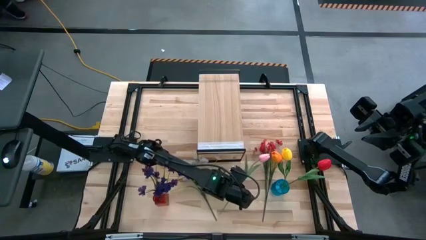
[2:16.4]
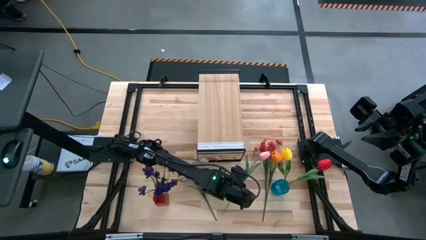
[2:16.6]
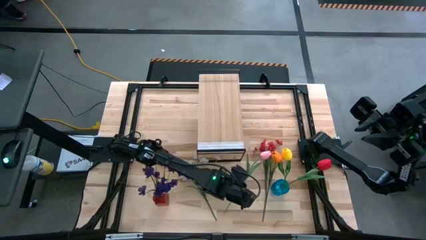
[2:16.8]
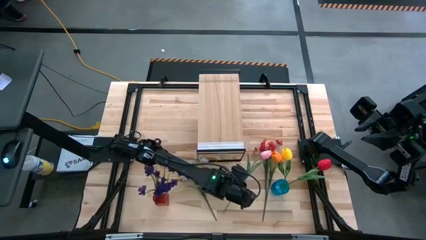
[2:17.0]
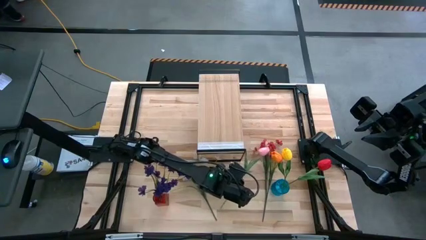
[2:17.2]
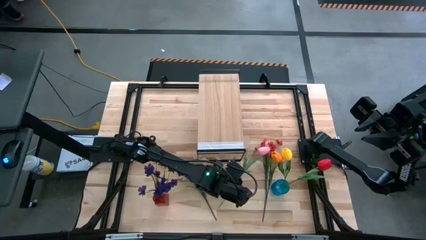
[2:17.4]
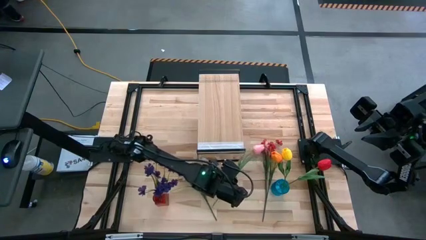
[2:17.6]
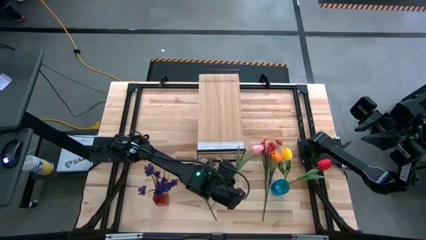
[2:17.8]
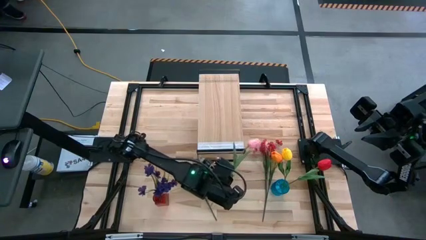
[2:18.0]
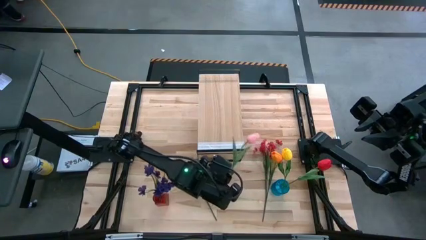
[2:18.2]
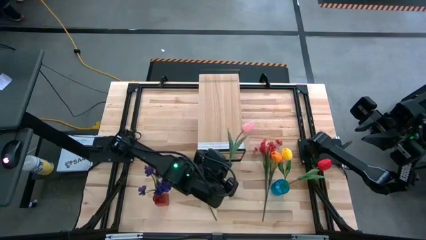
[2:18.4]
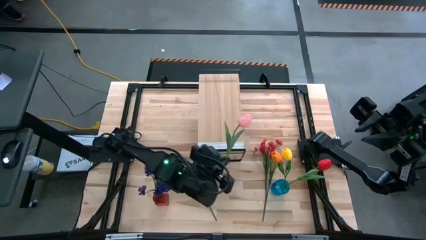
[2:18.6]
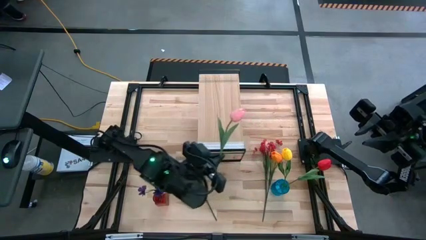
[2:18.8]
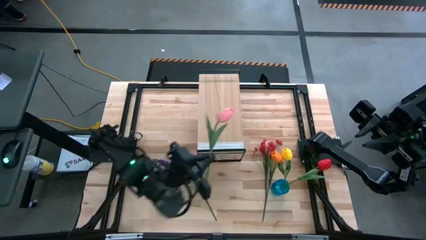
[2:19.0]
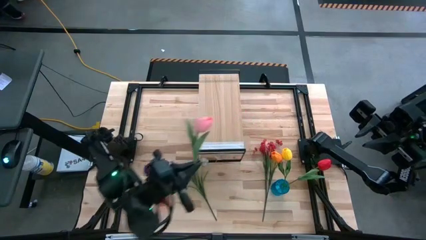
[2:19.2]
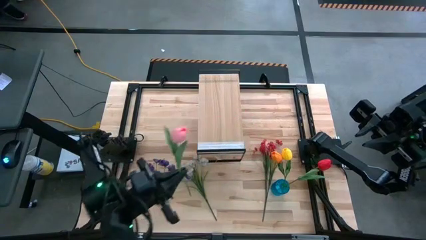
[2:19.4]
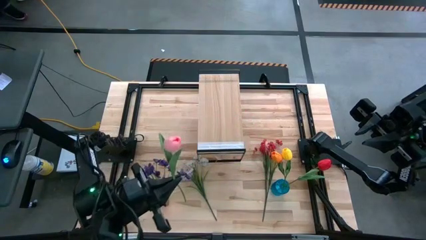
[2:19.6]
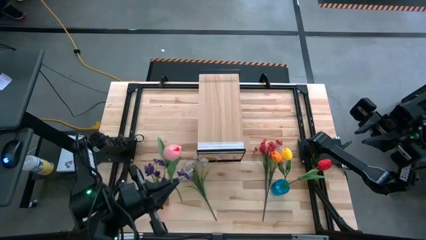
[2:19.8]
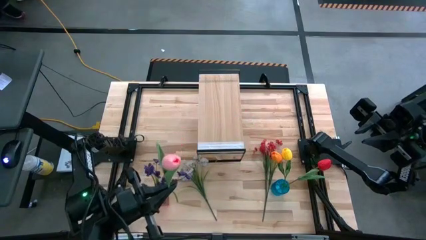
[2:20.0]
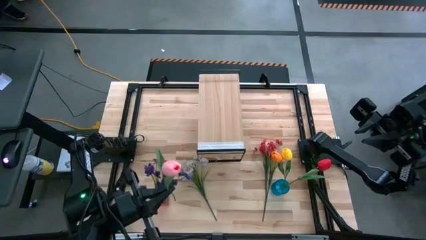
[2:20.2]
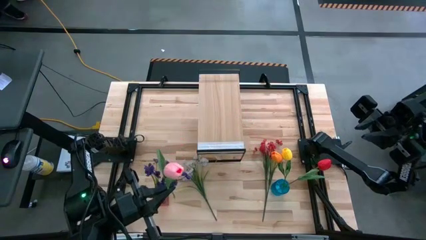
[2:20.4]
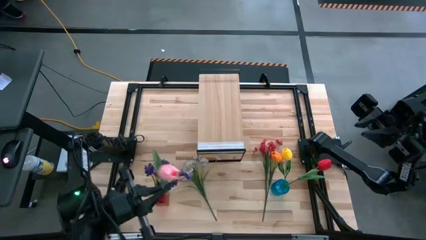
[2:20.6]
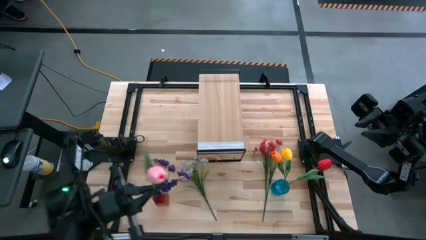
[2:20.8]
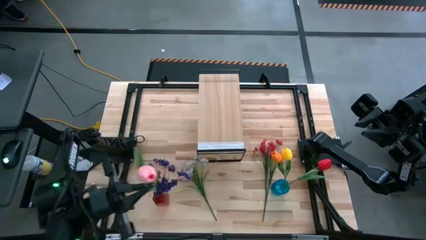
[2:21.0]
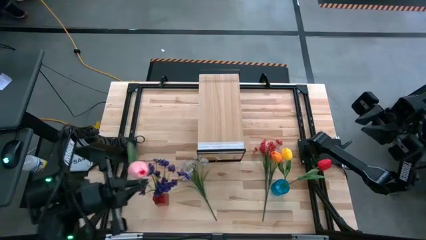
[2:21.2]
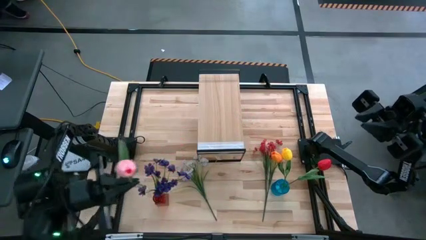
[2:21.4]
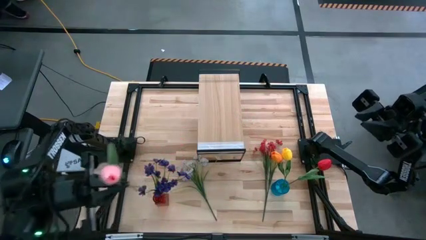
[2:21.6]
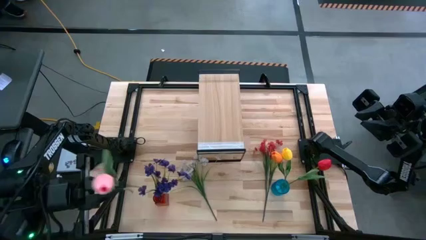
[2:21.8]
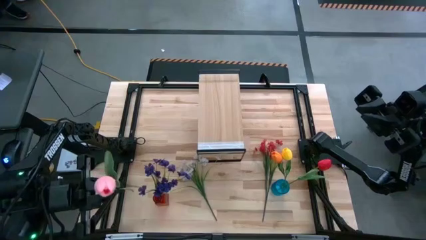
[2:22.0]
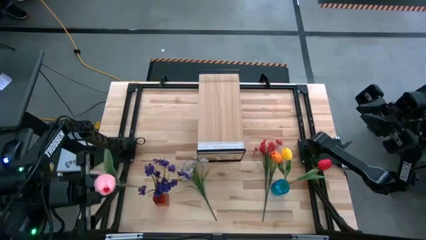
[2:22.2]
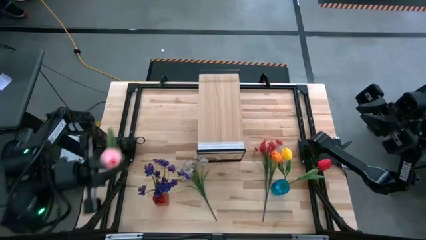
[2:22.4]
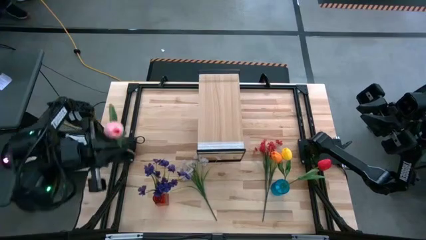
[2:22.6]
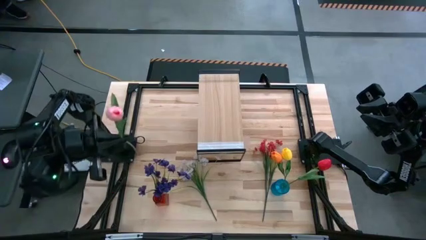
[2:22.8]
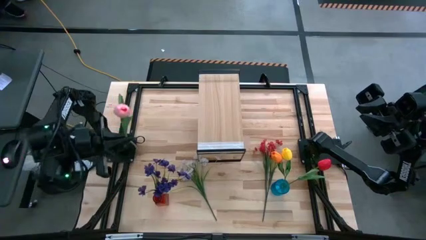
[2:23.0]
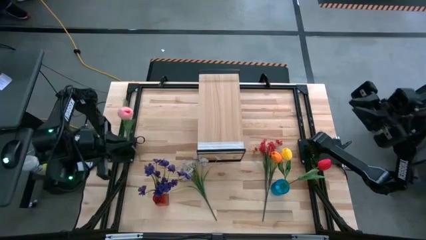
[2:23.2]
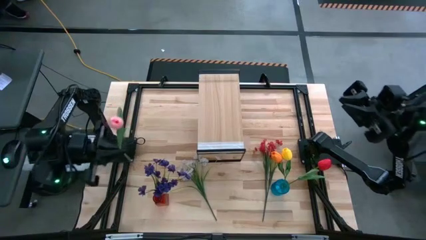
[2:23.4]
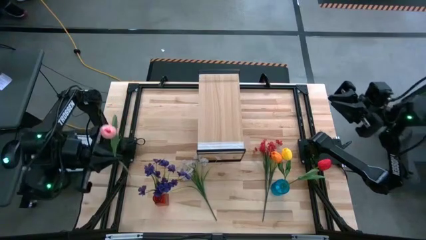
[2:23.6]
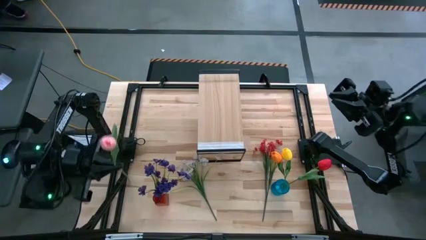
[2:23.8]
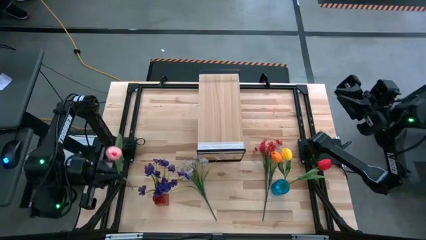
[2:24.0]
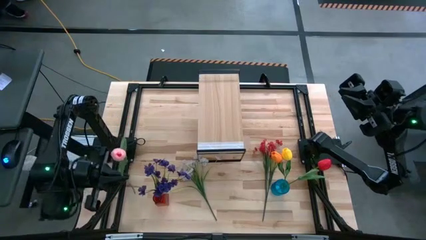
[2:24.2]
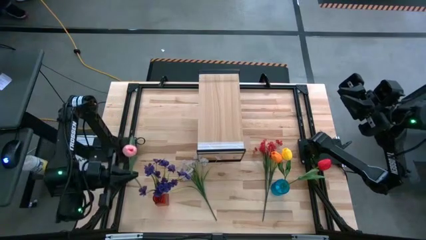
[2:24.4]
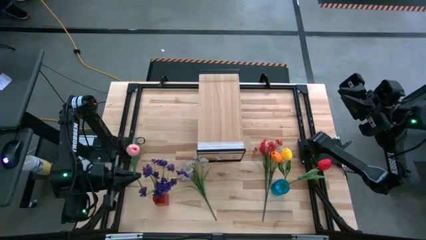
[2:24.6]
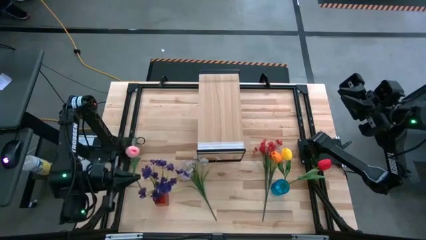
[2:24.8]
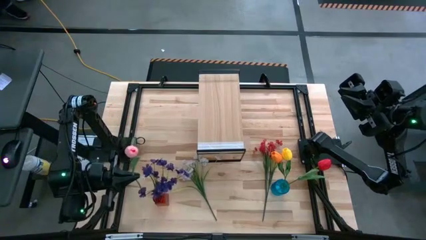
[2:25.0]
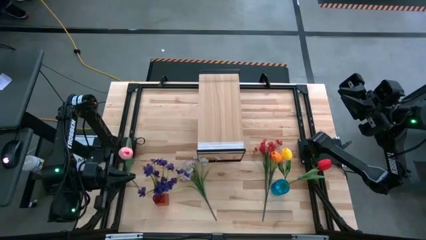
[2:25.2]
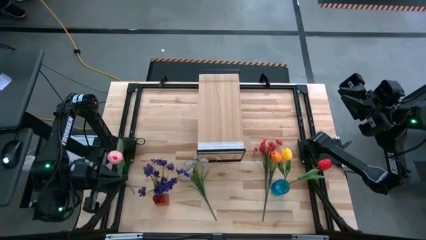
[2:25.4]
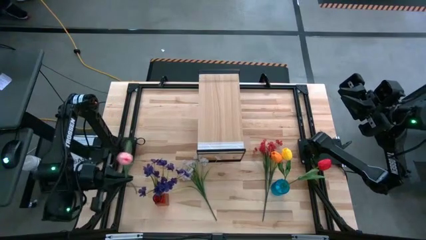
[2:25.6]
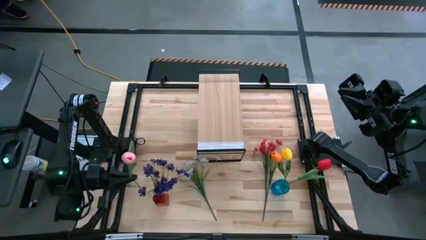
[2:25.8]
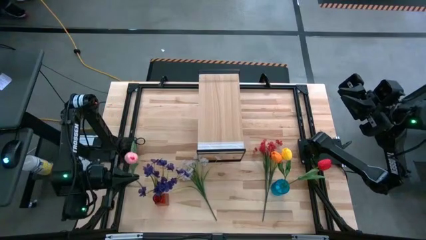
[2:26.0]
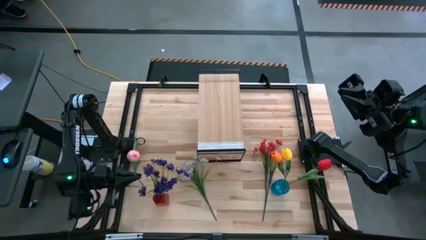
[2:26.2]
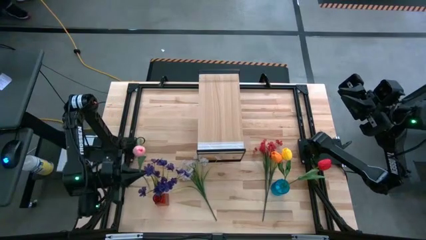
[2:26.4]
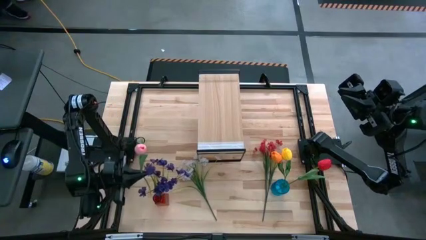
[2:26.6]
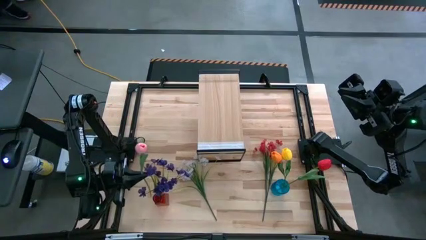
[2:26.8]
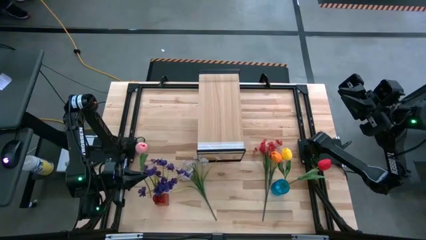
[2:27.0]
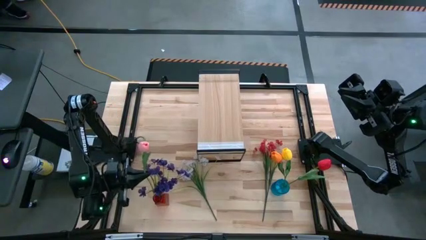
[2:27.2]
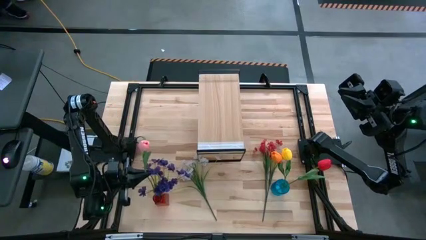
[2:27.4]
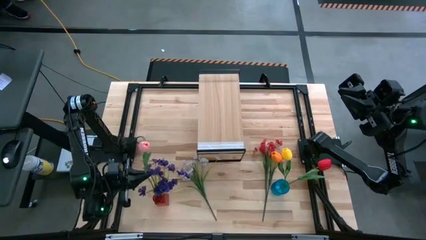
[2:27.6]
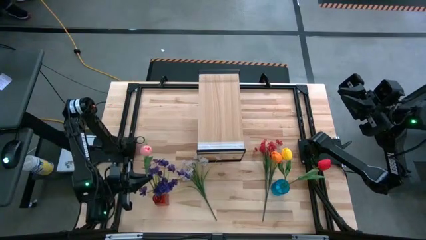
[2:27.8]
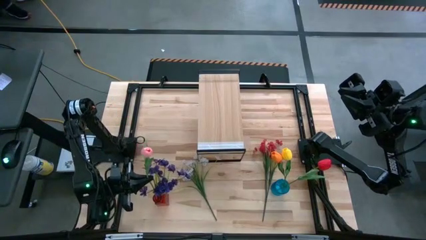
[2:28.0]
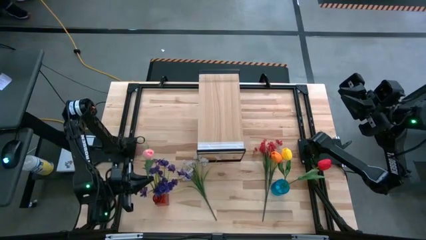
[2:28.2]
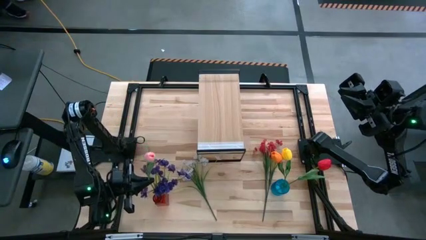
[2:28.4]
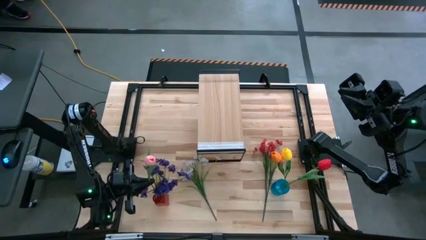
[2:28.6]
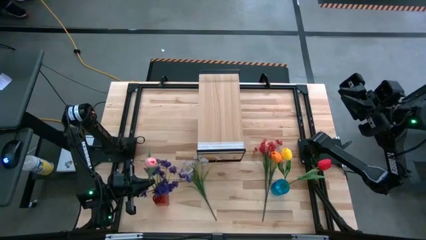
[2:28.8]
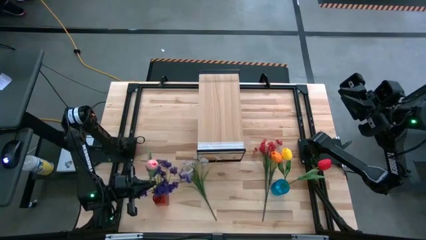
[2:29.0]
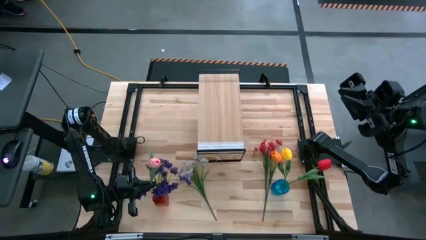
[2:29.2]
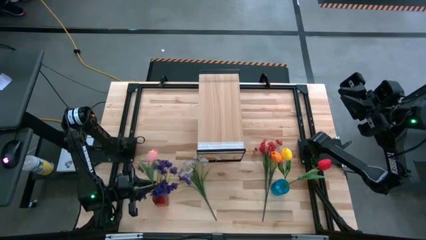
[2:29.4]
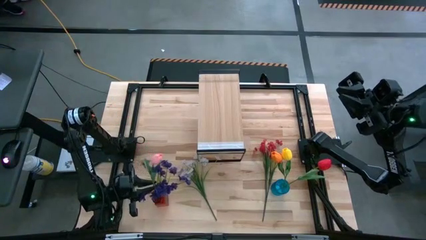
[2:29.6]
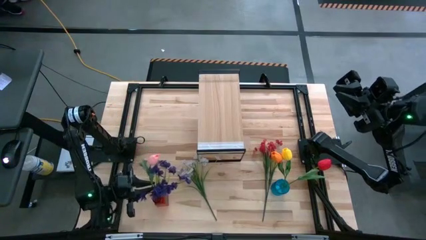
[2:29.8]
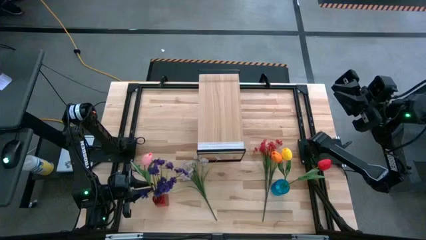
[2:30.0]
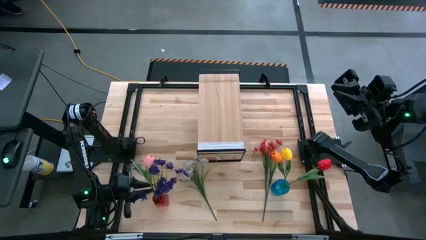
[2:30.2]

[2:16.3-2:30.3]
Task: Pick and place flowers into a vace then onto a shelf
Put the pink tulip into the red vase

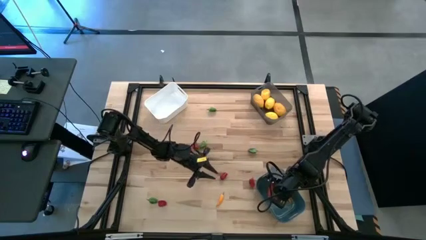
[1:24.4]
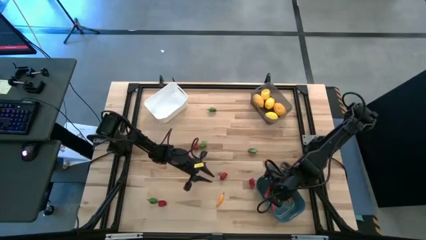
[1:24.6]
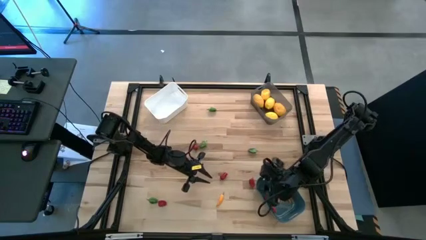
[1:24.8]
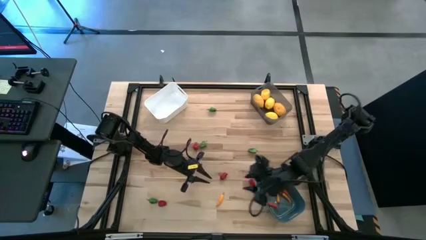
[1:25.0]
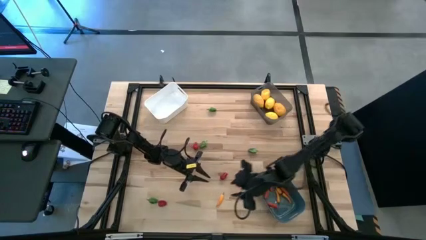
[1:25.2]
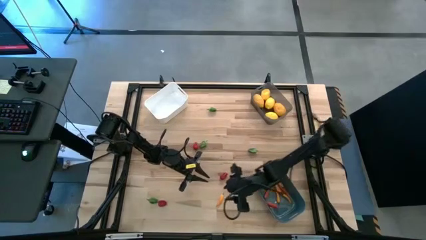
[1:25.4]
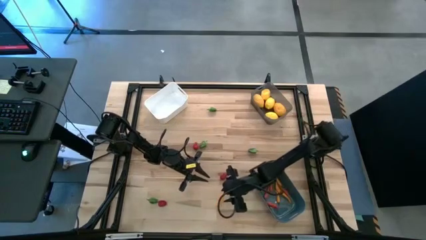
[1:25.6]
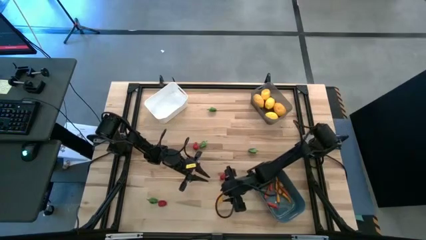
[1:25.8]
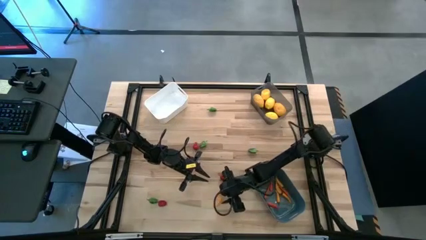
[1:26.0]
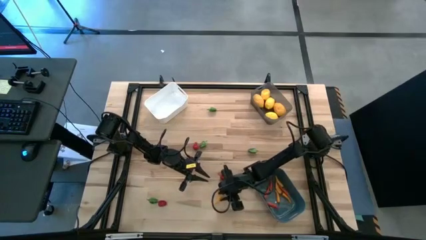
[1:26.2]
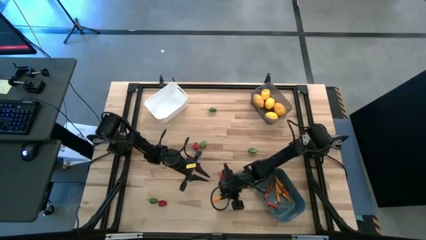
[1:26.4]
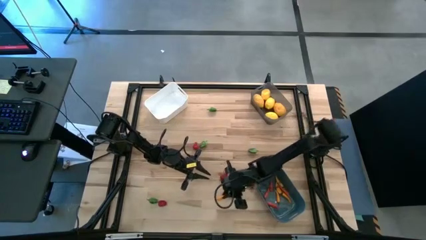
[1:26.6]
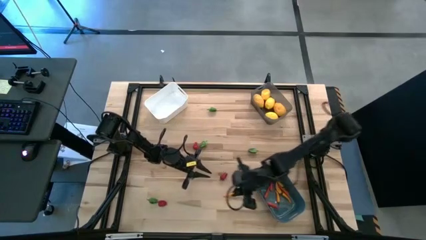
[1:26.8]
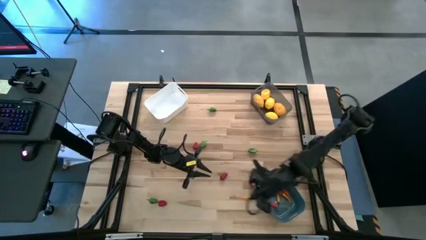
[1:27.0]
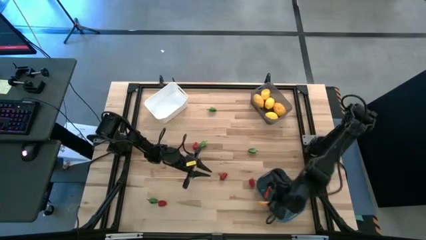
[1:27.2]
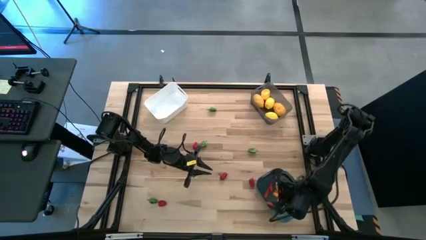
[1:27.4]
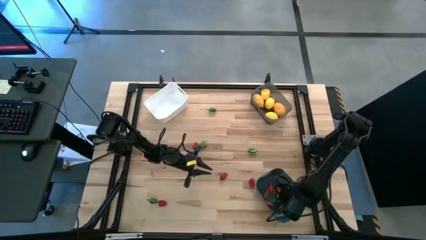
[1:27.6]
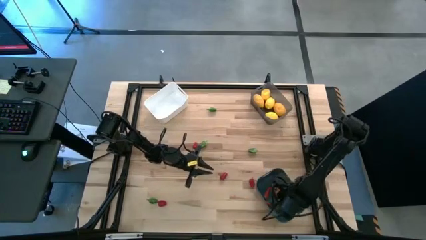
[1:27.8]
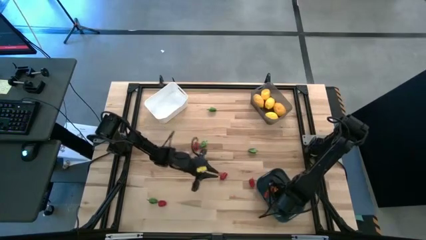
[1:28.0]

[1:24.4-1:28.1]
Task: Sort produce into baskets
Put the yellow chili pepper into the blue bin
